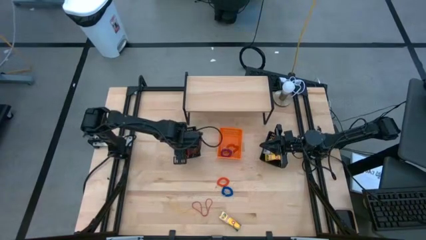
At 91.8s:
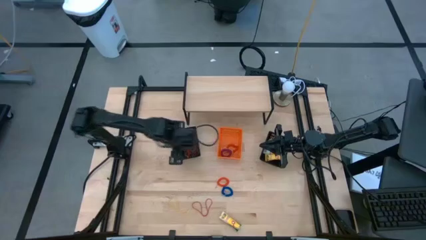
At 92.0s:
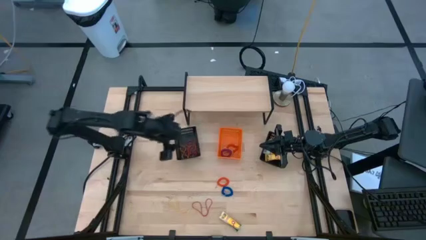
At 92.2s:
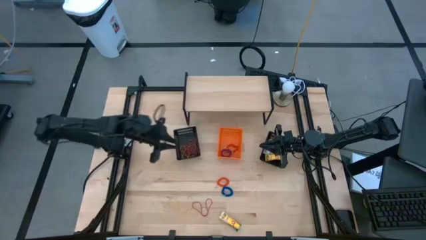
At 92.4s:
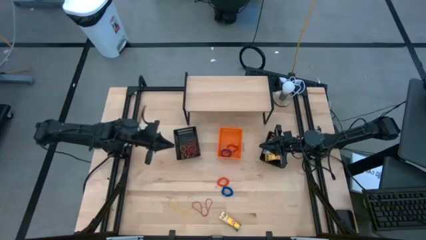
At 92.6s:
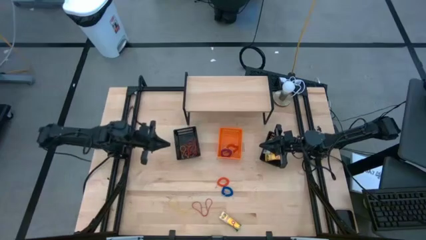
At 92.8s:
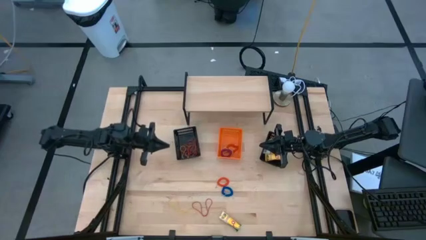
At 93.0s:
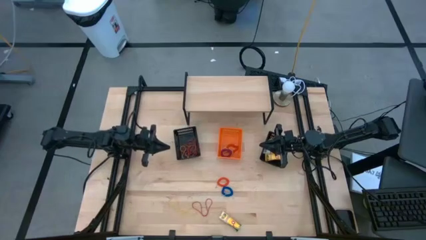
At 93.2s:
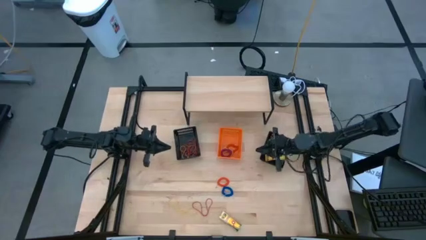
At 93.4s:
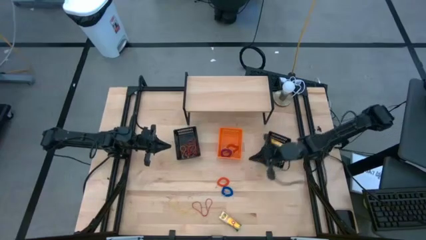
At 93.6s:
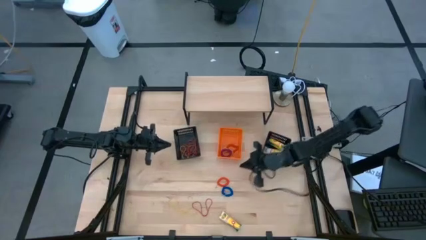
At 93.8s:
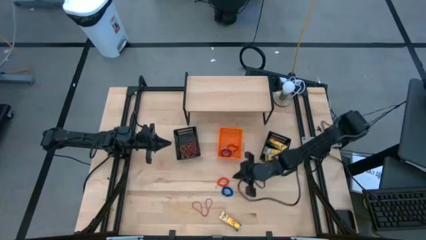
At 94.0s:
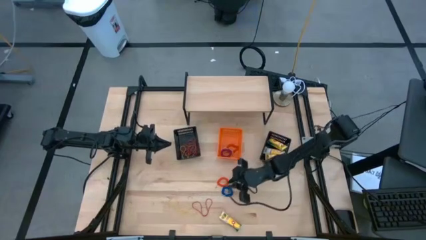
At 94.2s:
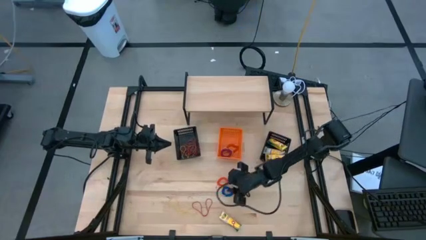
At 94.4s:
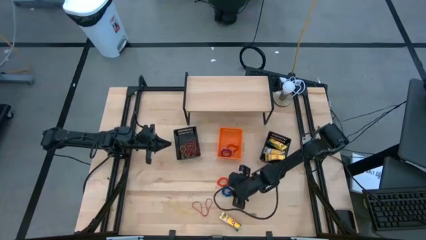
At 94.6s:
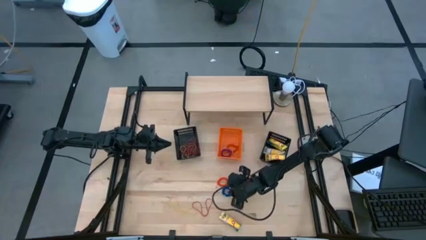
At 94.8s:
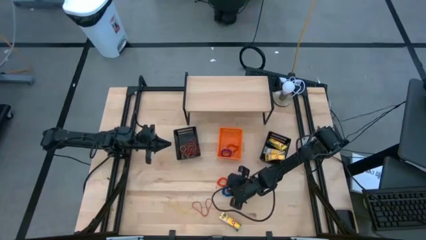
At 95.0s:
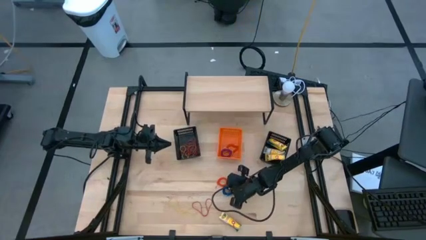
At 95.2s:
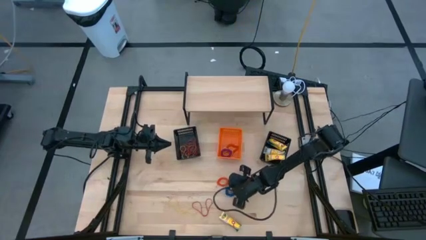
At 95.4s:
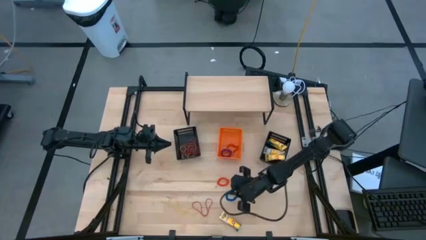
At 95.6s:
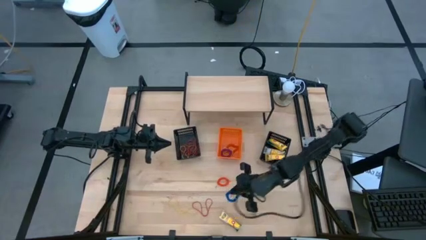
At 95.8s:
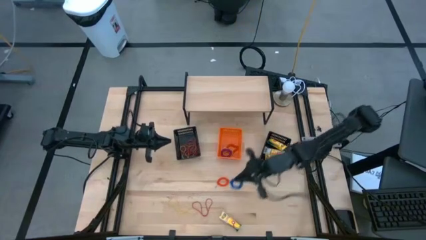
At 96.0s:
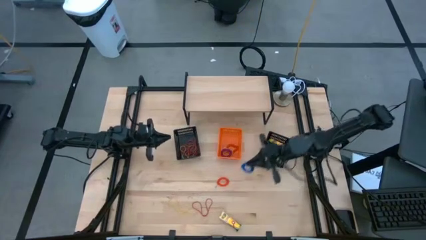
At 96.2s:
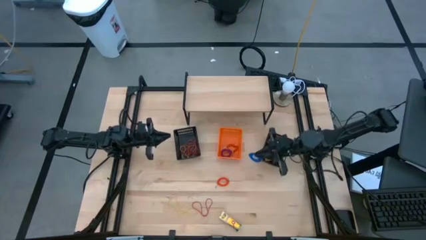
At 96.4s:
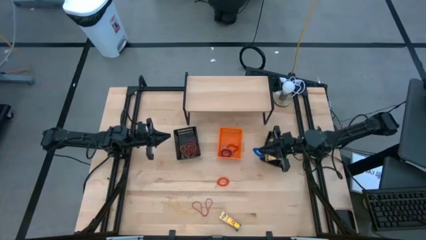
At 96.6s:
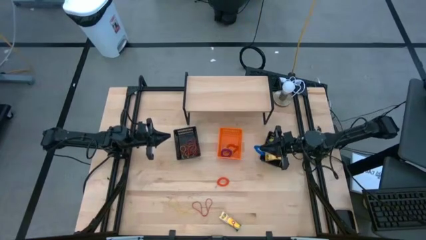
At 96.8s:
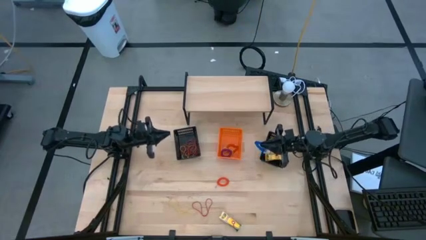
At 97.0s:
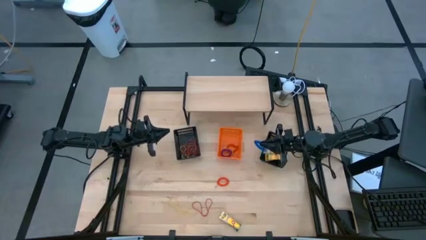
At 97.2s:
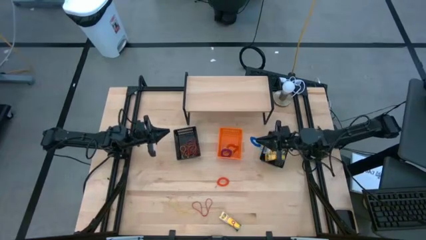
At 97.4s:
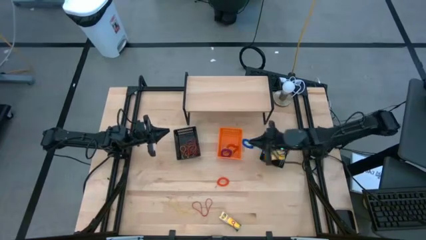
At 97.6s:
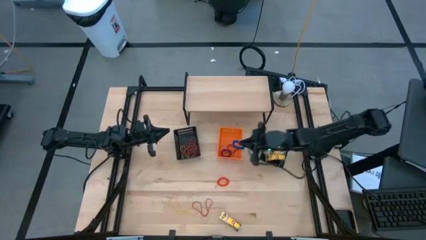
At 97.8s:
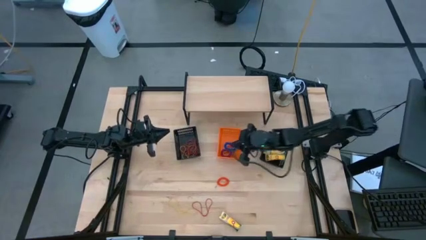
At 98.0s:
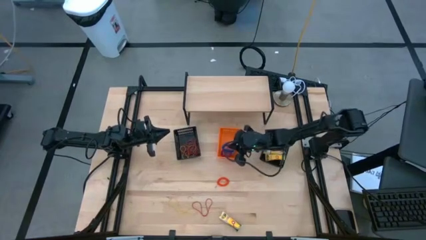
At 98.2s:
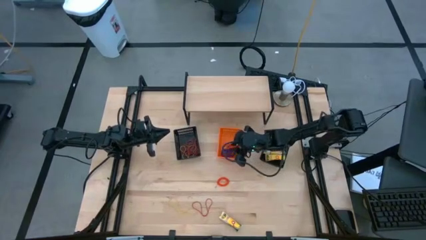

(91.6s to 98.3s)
Task: Pick & Place Office Desk Supplies
Put the blue spring keychain into the orange bin

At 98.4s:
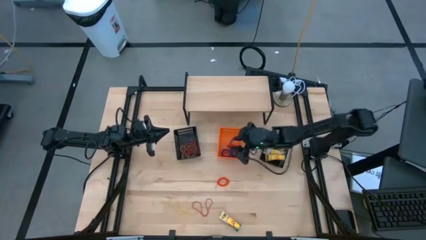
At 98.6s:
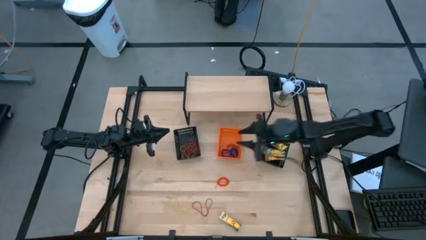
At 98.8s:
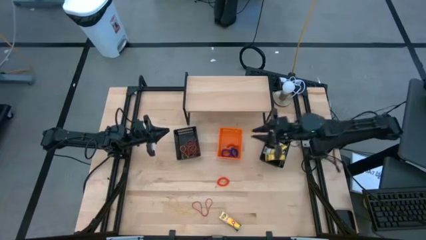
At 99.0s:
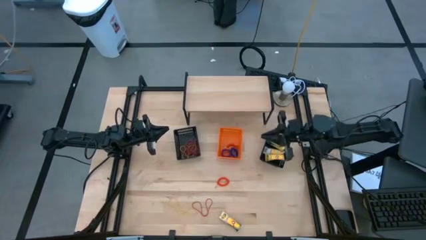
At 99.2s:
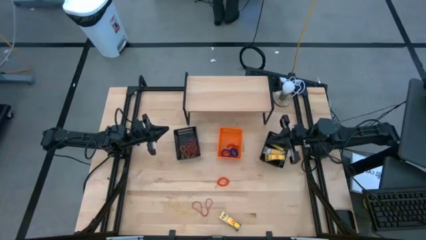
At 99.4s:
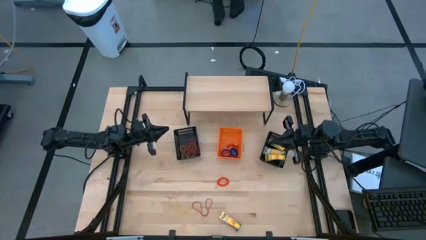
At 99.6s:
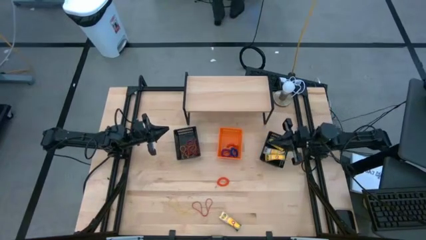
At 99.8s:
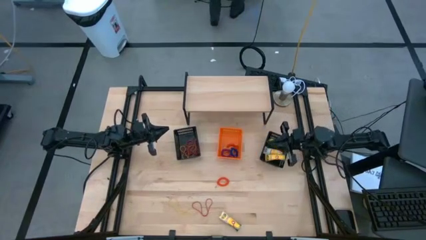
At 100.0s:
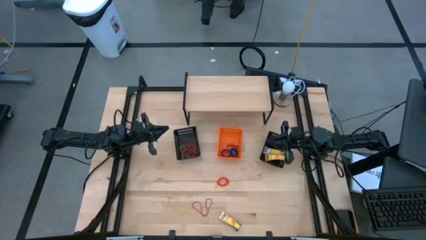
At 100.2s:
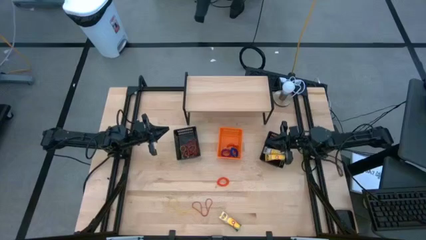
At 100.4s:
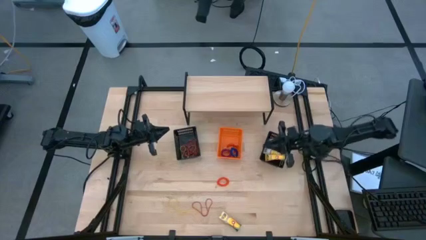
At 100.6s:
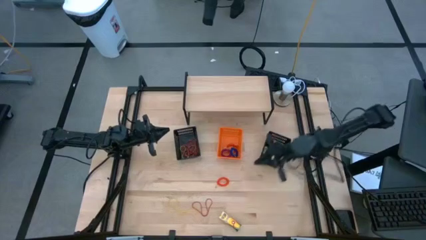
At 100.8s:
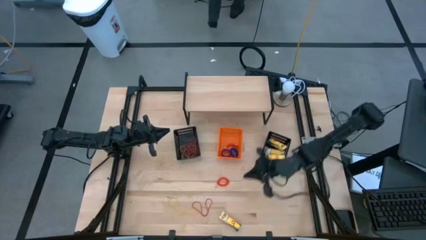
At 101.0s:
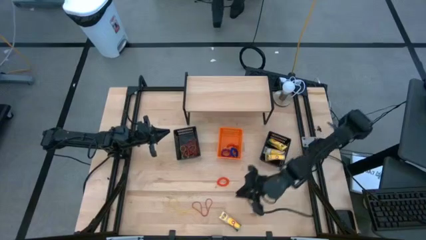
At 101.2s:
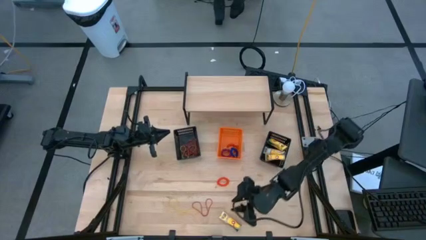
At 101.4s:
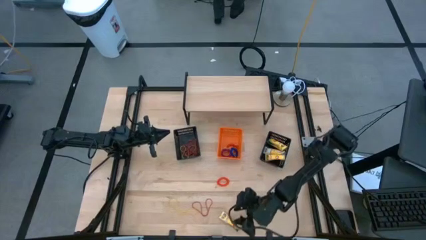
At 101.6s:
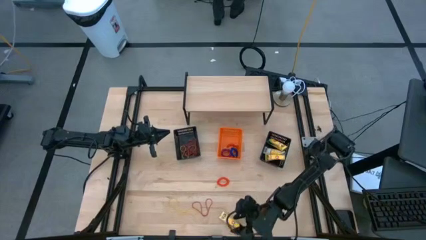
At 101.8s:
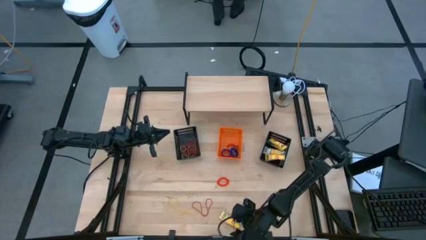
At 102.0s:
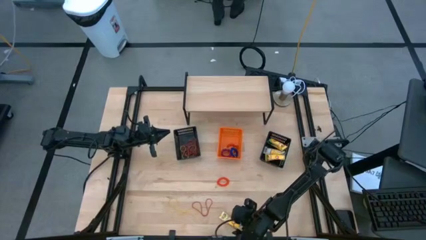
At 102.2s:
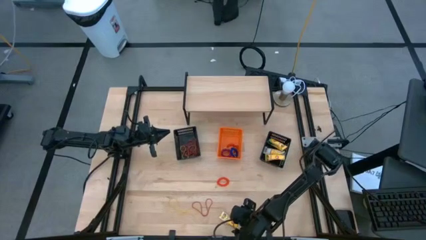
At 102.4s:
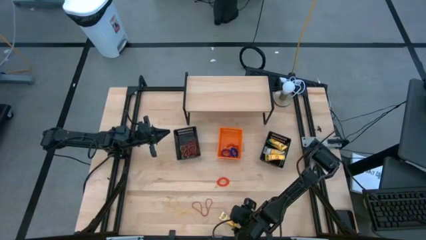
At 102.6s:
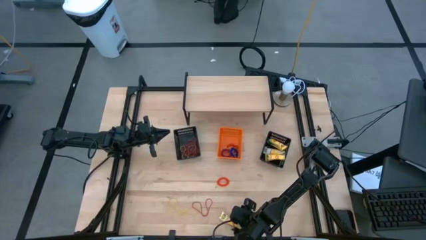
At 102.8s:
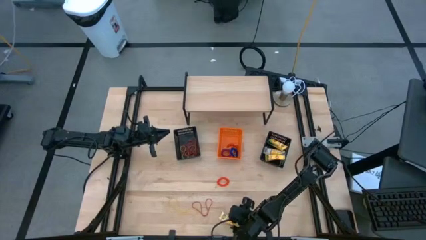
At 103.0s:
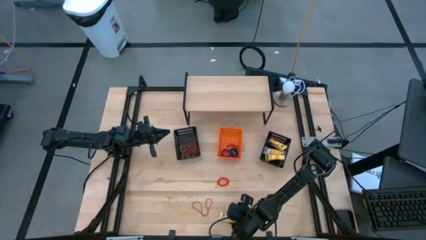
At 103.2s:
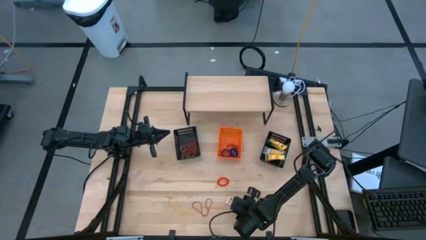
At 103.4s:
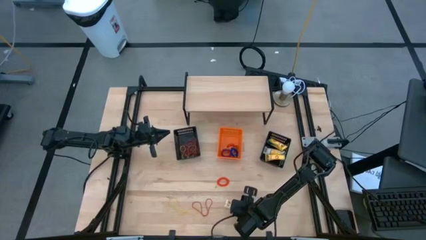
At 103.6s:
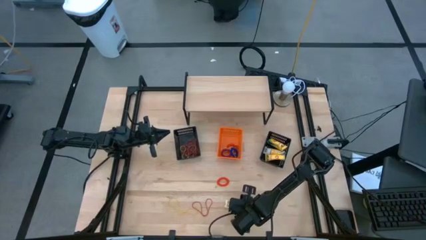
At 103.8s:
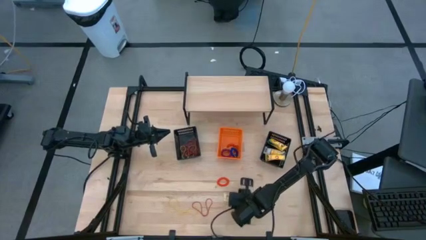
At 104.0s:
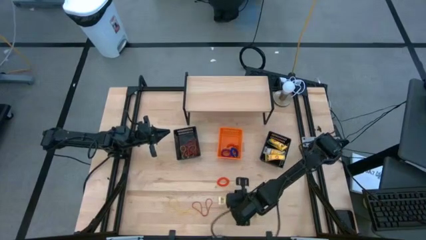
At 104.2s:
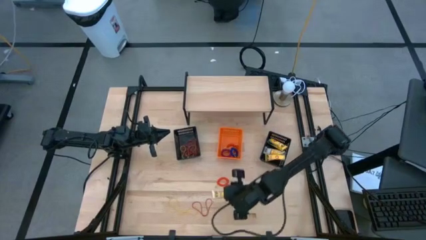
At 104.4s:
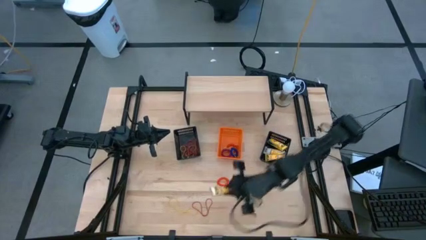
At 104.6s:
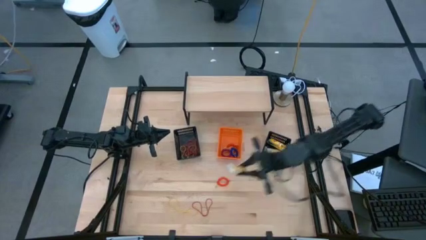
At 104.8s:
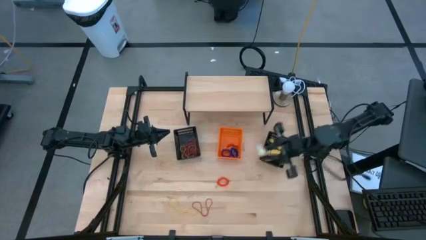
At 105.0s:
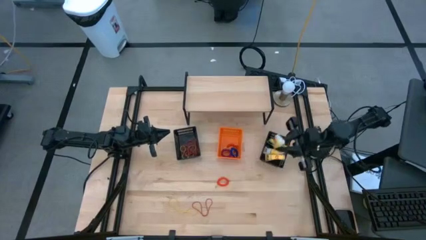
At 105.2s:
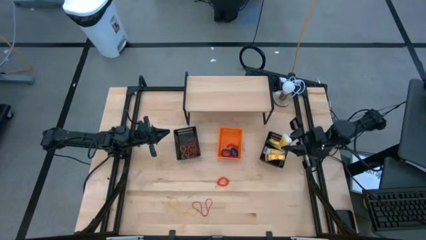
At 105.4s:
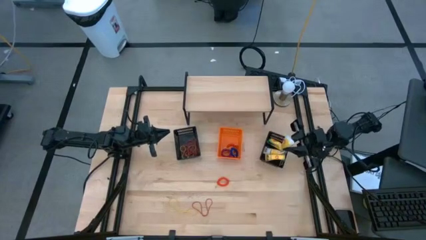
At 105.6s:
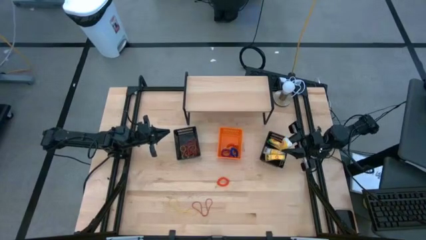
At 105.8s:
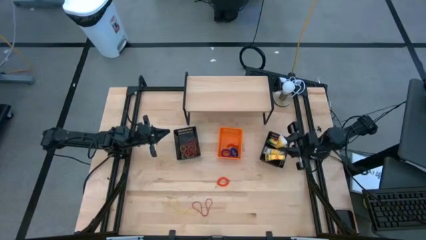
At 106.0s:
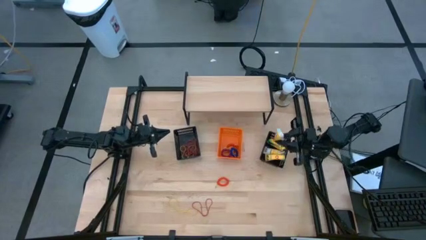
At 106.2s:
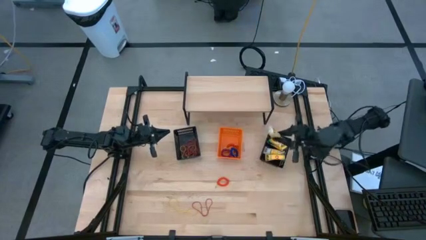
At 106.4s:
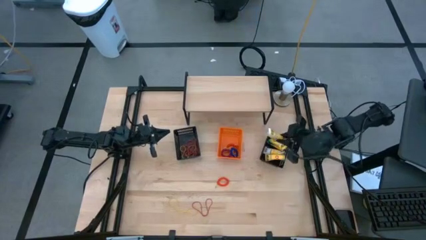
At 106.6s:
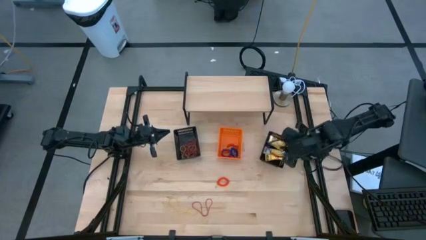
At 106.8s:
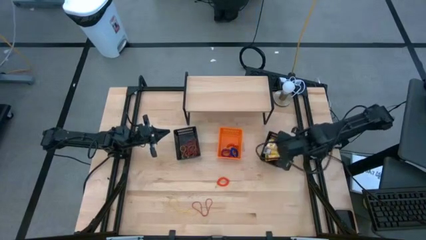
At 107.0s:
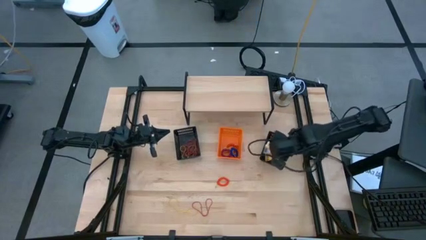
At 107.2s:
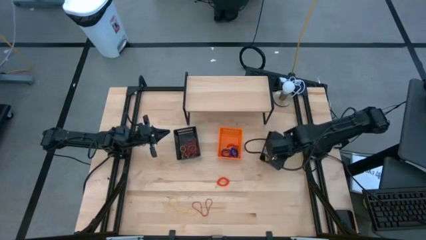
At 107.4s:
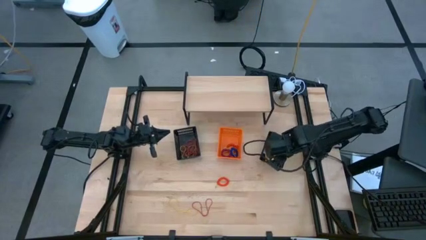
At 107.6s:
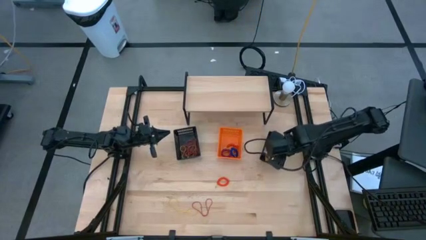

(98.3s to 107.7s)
Put the yellow crayon box into the right black bin
